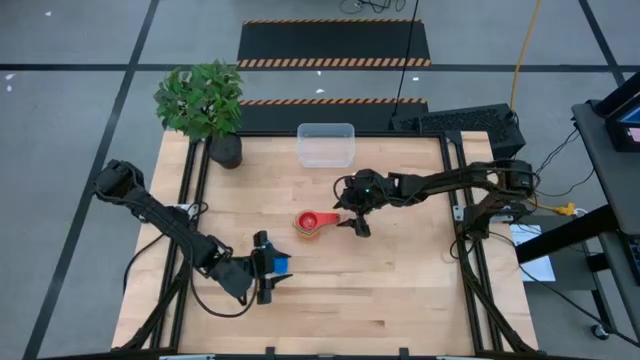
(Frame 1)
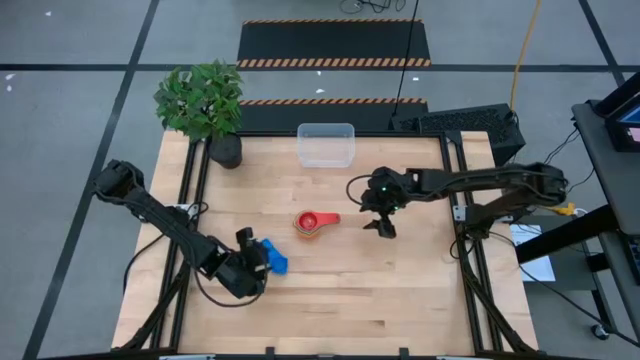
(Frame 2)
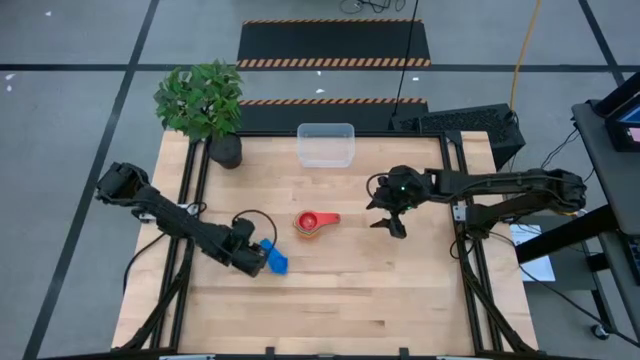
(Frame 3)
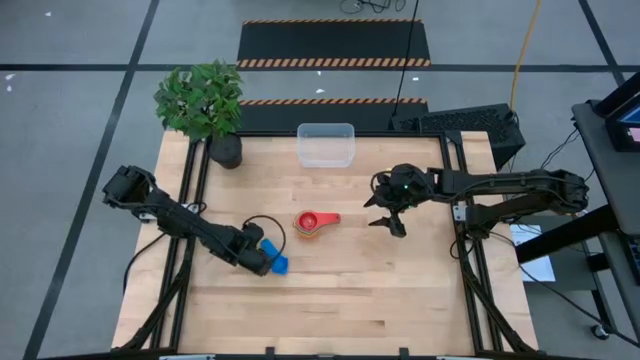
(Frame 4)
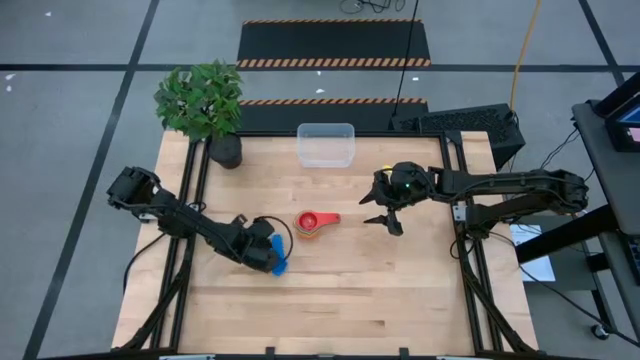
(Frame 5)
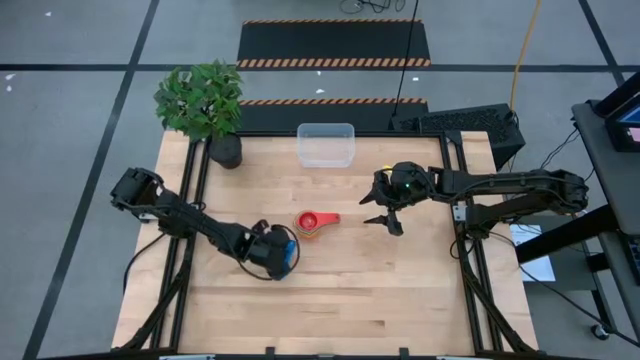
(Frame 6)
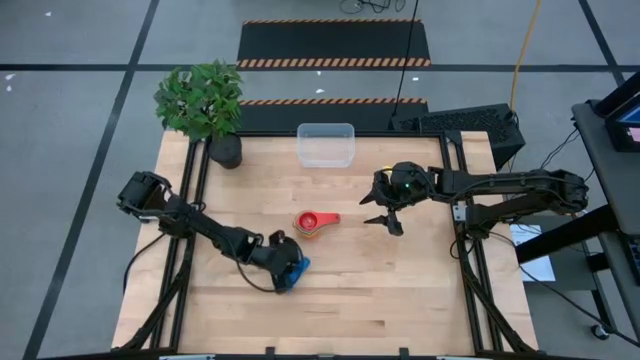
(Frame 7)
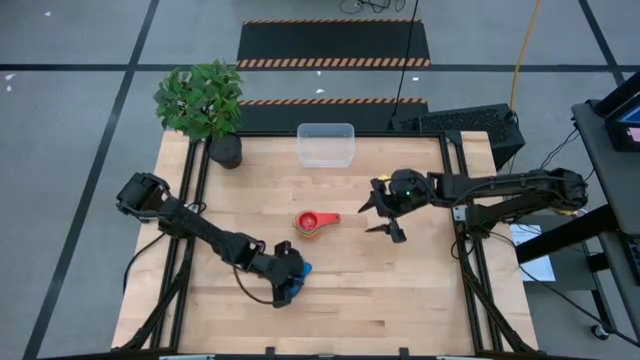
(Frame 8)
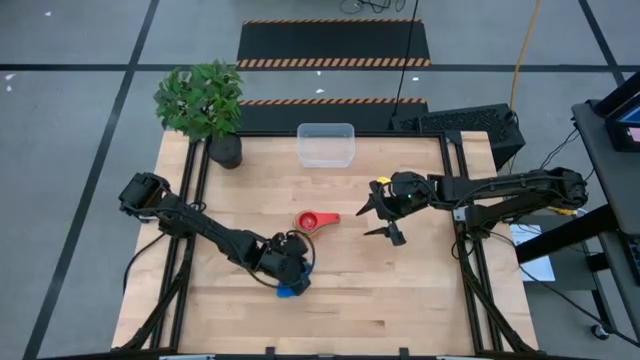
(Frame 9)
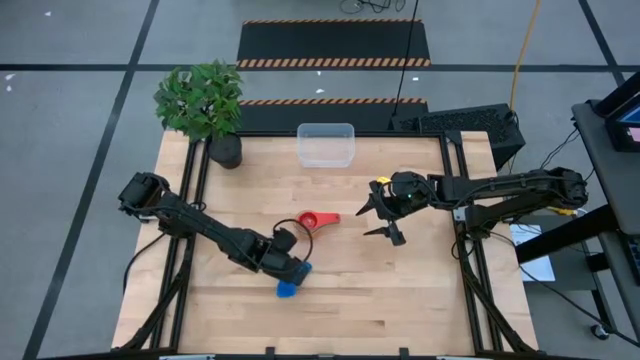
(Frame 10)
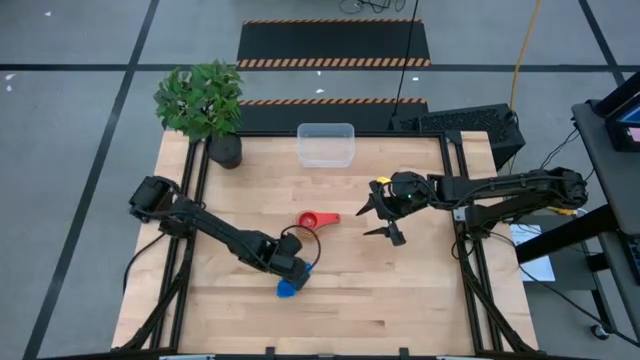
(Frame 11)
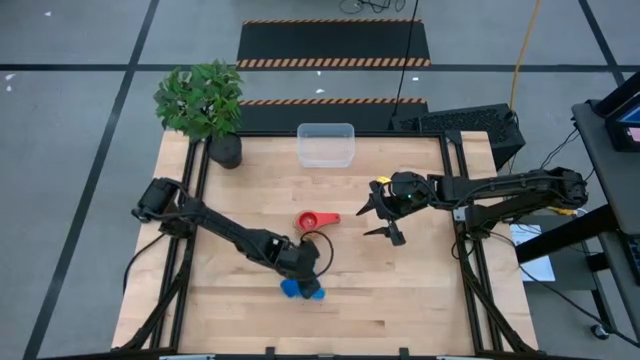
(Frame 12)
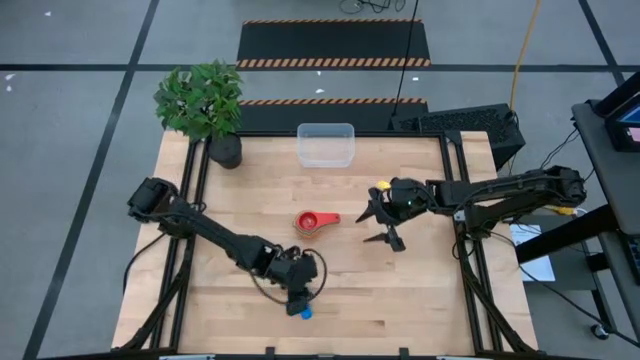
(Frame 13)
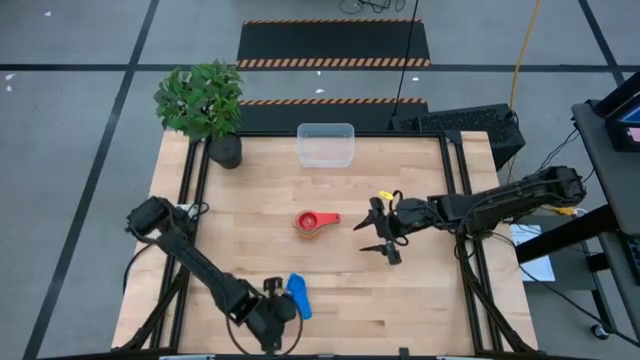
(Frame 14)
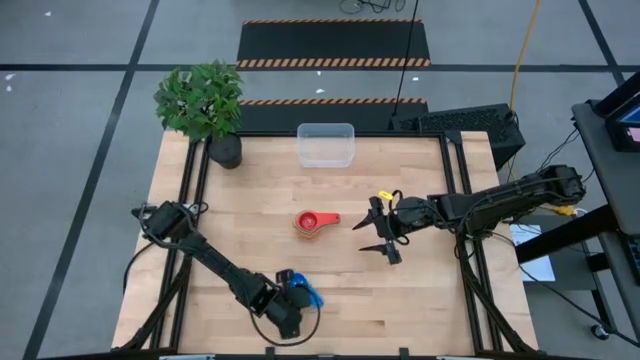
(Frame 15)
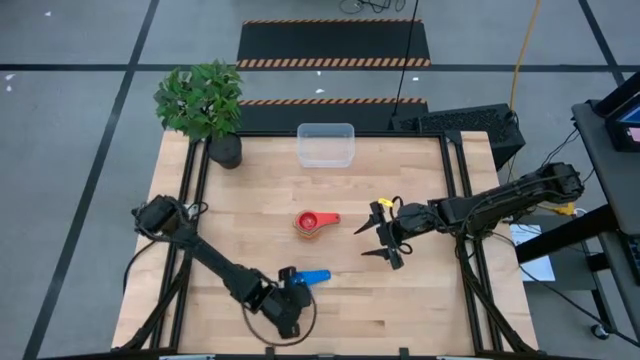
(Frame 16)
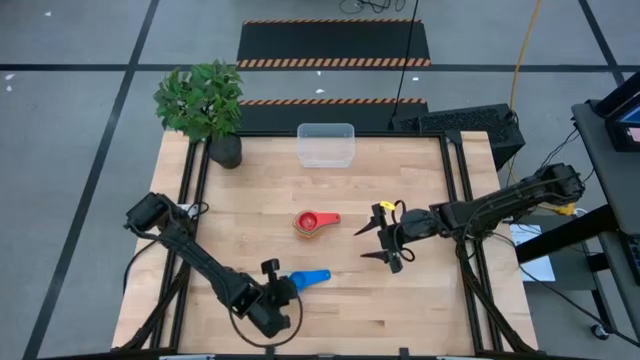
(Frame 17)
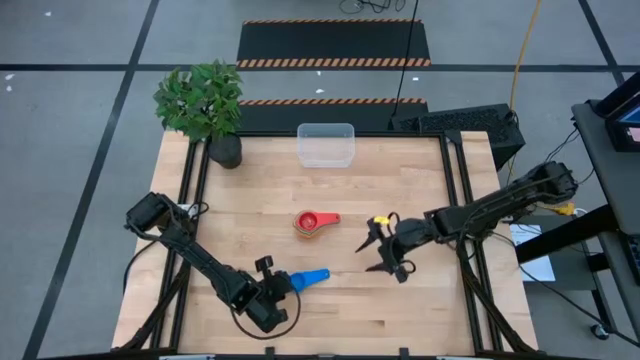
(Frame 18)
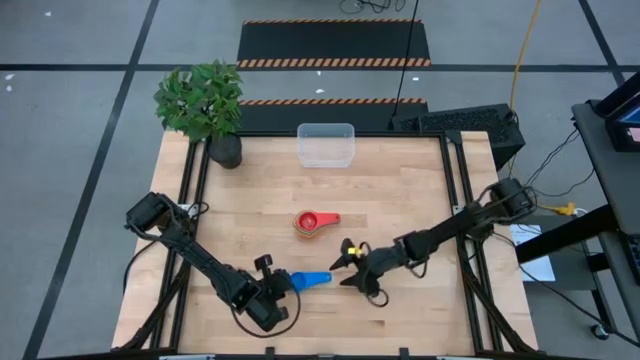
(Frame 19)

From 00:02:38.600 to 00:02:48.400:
Task: Nest measuring cups in basket
Stack the blue measuring cup on top of the red measuring cup

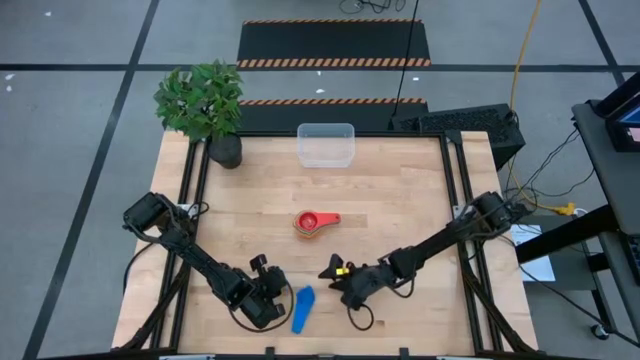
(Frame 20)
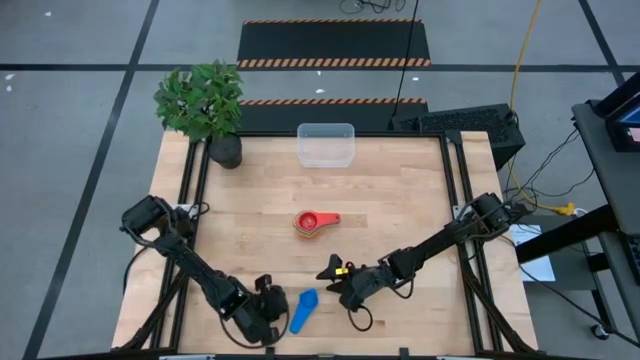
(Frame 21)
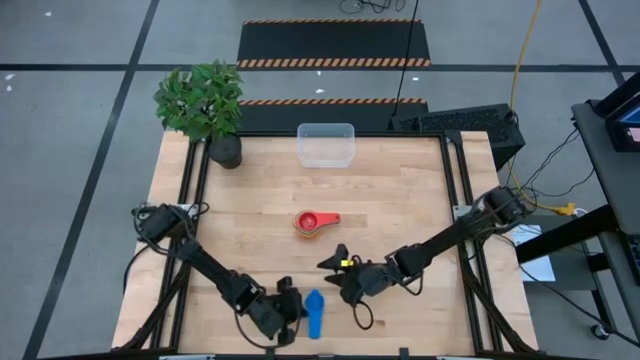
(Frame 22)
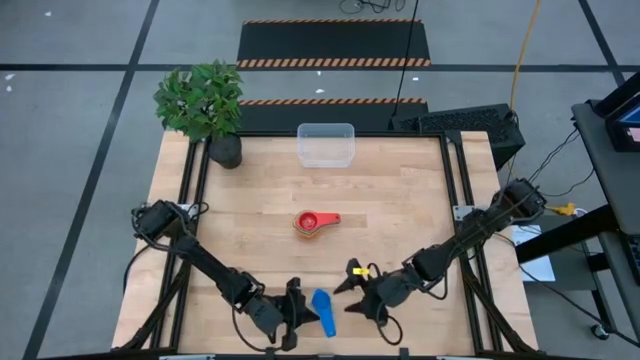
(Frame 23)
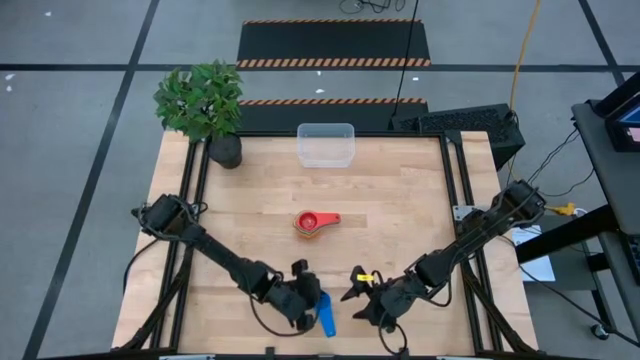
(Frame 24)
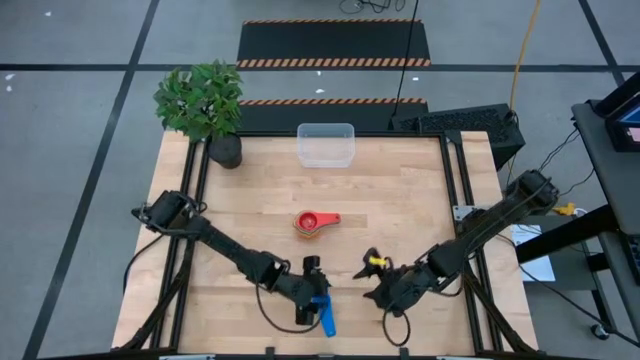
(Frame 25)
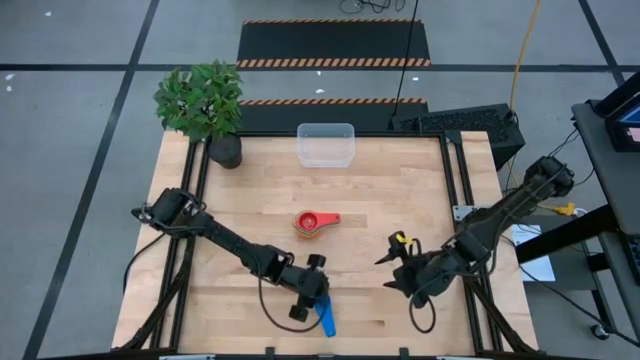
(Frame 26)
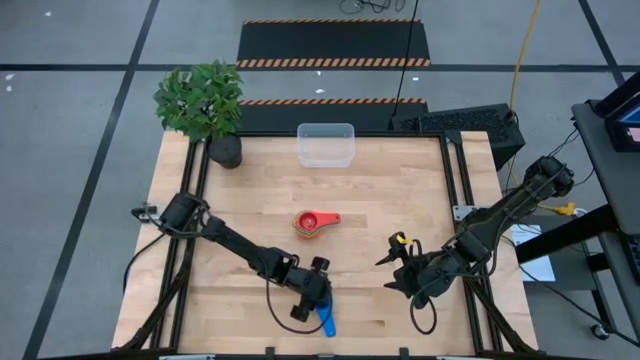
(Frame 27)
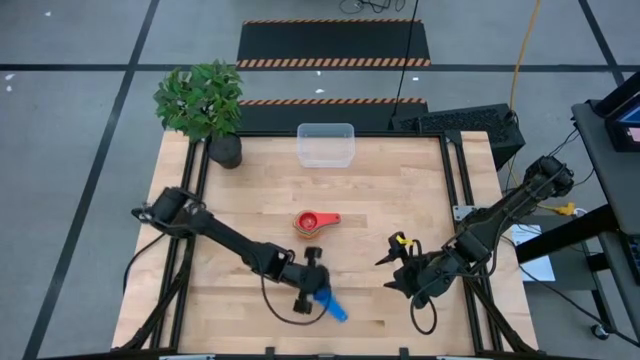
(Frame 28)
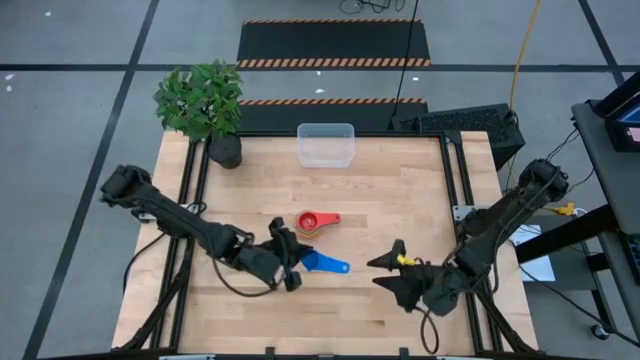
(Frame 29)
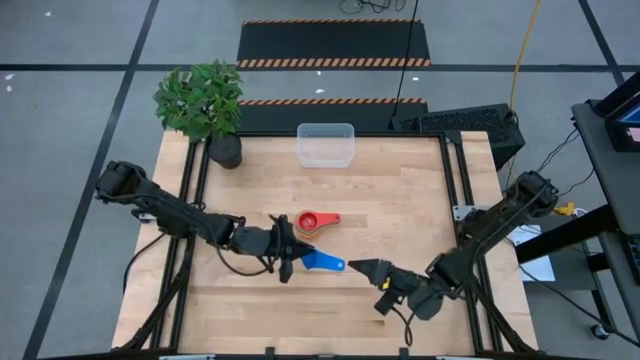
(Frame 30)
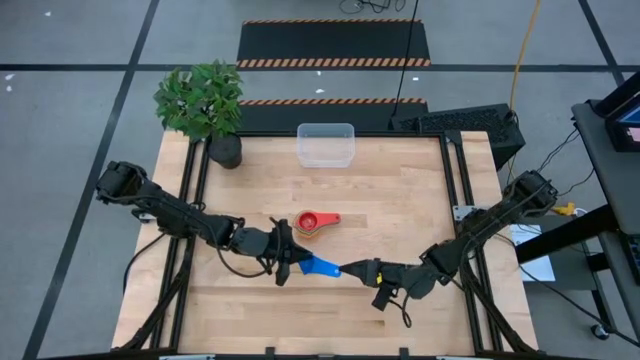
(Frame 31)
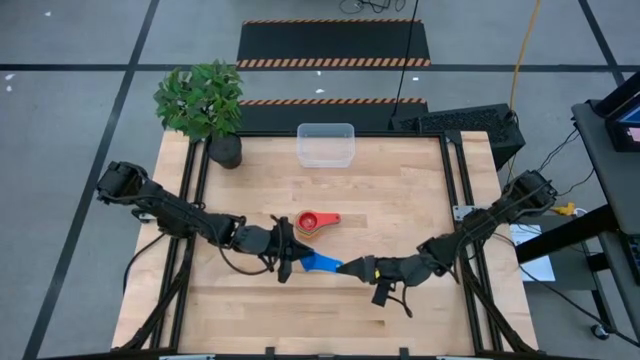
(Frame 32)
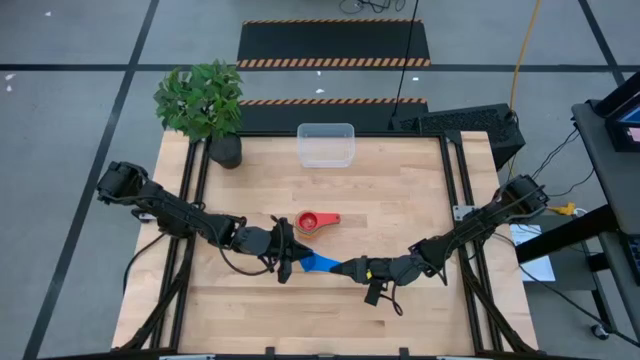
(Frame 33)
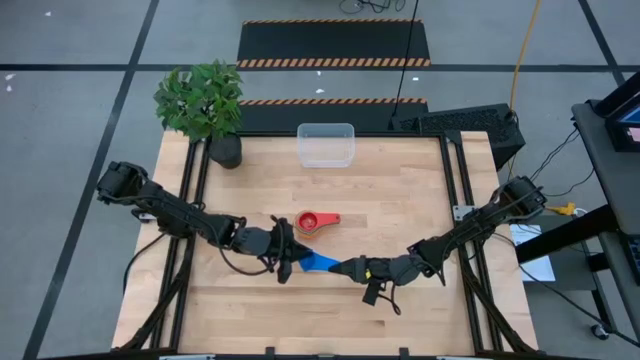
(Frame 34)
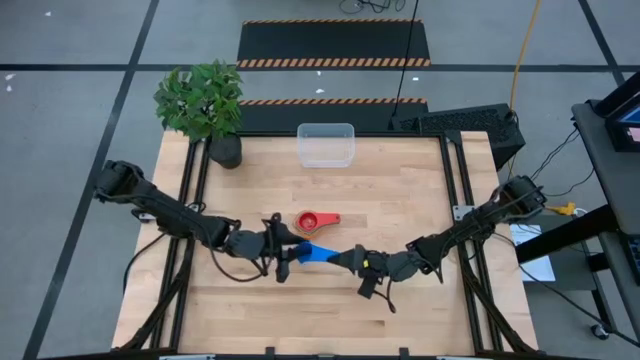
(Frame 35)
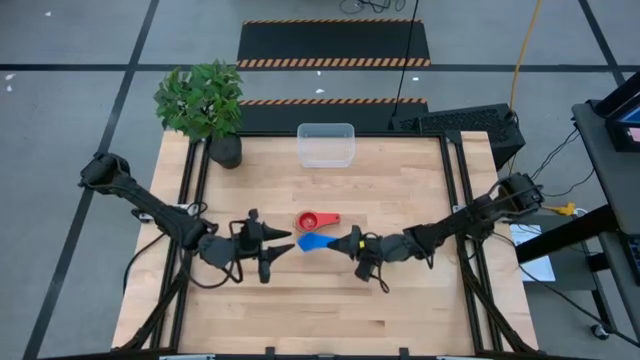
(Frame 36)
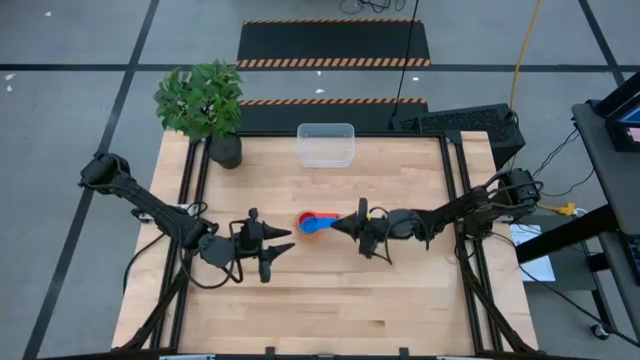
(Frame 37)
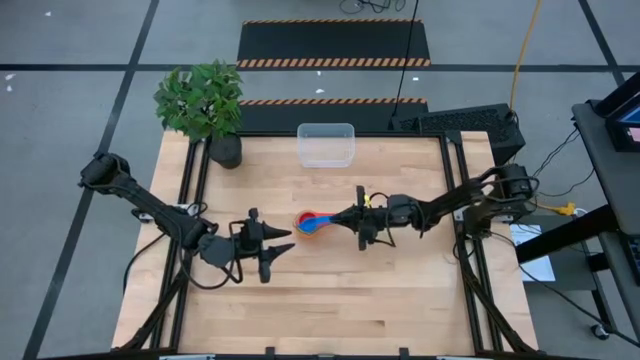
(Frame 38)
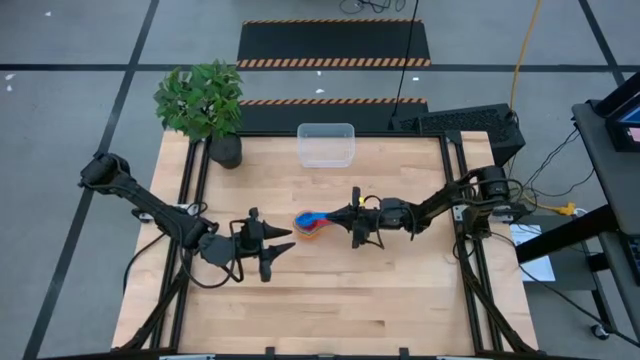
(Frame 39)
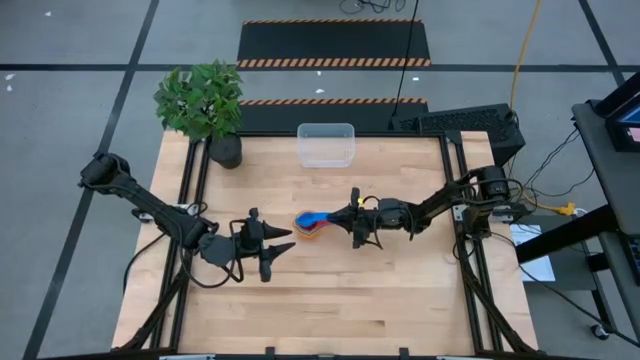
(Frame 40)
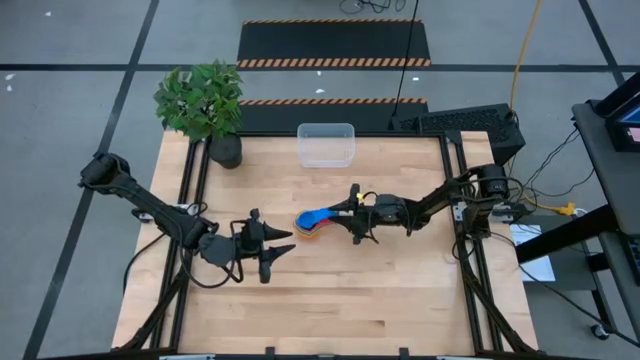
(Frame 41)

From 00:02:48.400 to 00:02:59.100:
Stack the blue measuring cup on top of the red measuring cup
